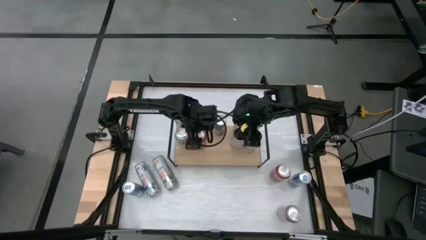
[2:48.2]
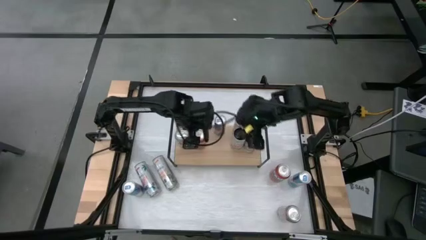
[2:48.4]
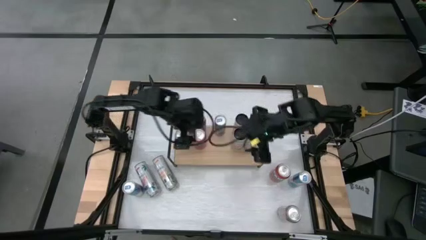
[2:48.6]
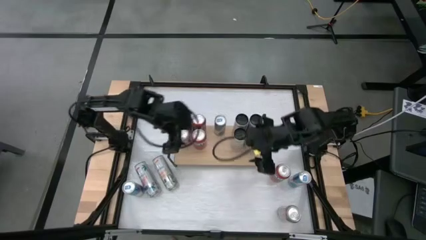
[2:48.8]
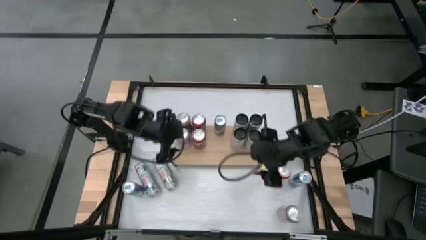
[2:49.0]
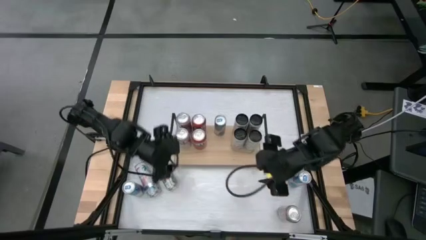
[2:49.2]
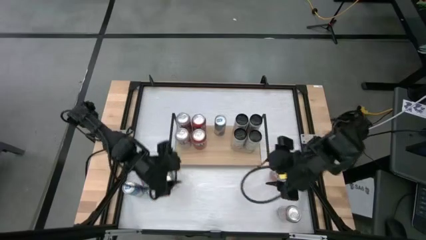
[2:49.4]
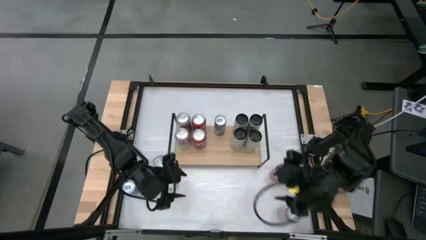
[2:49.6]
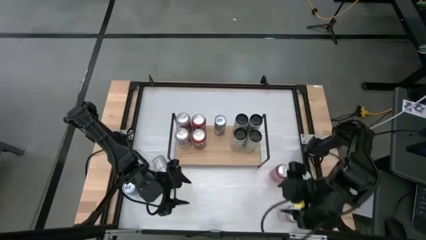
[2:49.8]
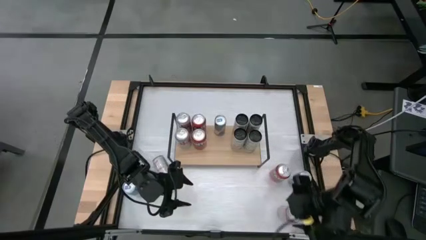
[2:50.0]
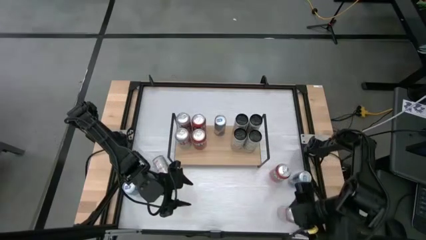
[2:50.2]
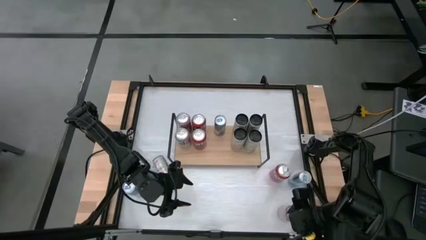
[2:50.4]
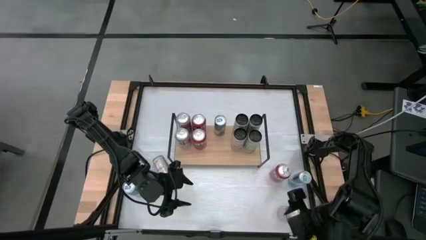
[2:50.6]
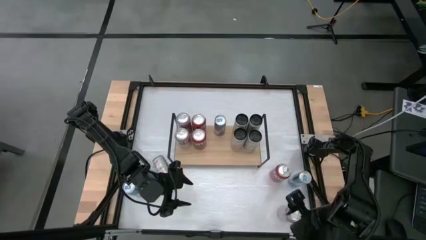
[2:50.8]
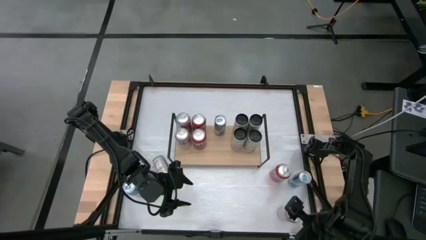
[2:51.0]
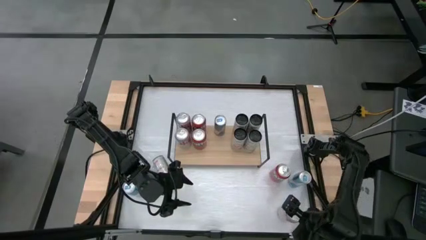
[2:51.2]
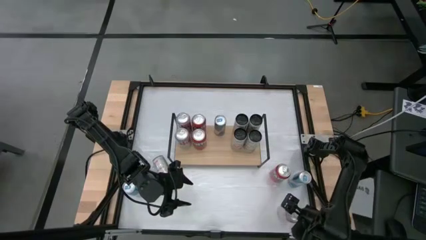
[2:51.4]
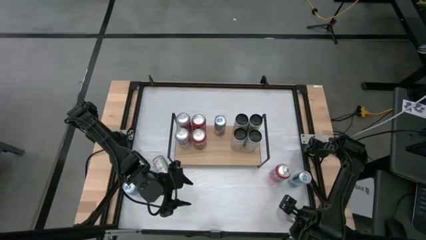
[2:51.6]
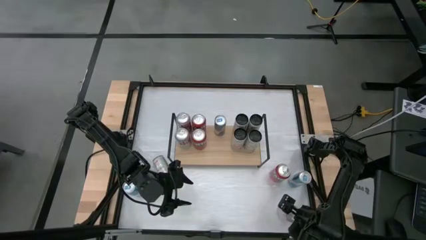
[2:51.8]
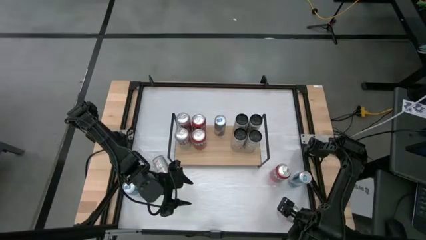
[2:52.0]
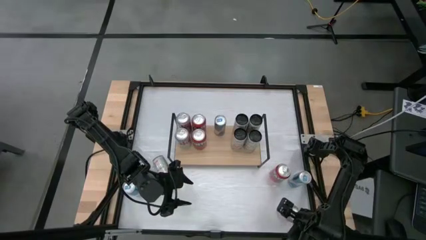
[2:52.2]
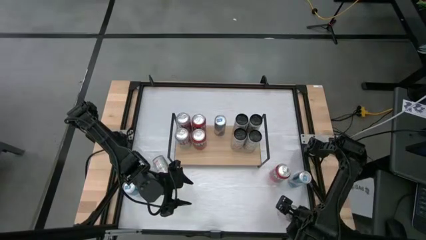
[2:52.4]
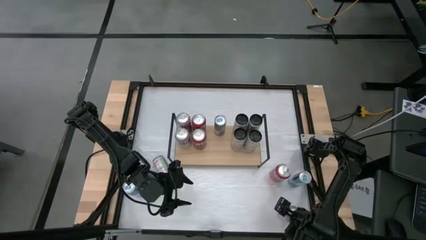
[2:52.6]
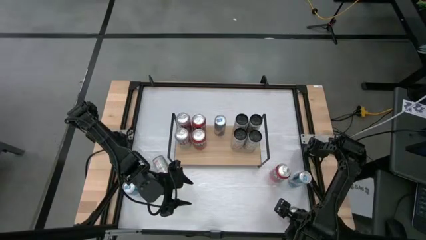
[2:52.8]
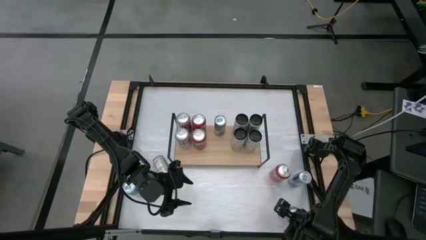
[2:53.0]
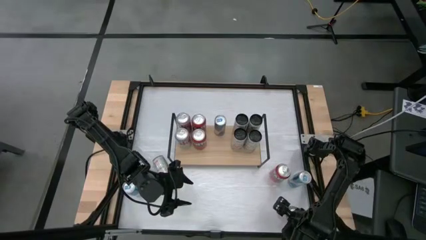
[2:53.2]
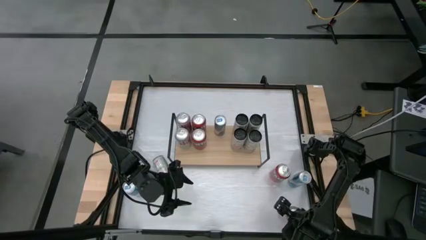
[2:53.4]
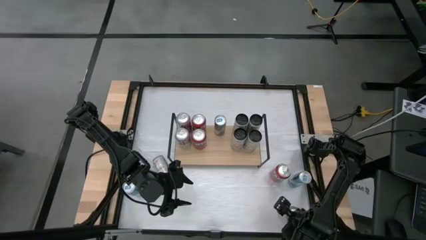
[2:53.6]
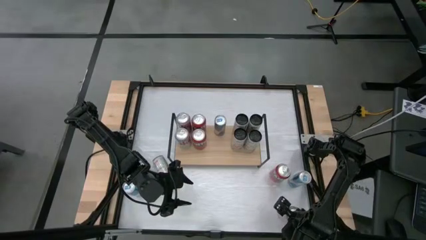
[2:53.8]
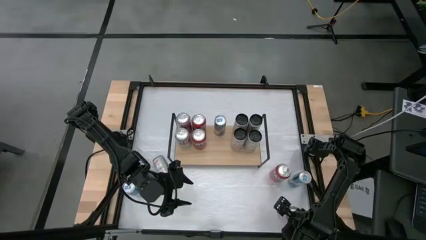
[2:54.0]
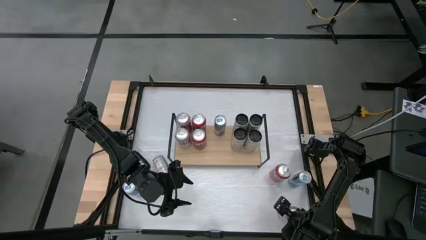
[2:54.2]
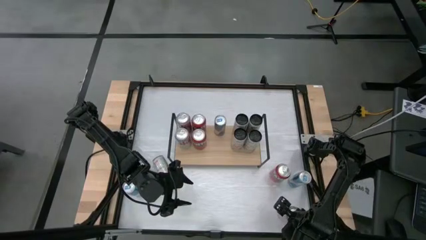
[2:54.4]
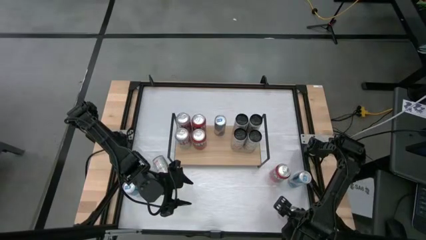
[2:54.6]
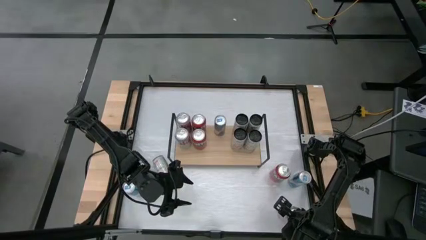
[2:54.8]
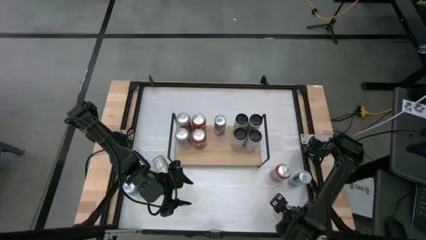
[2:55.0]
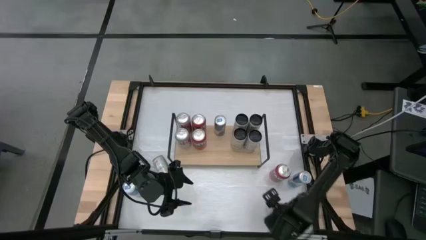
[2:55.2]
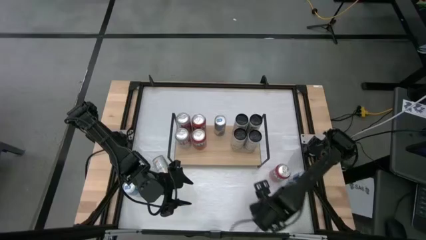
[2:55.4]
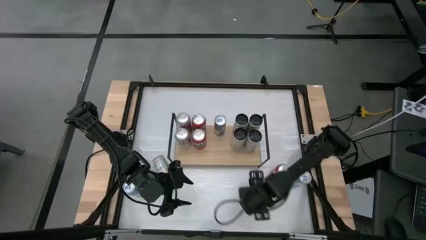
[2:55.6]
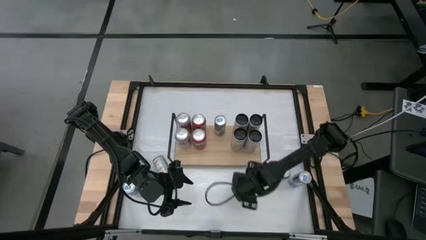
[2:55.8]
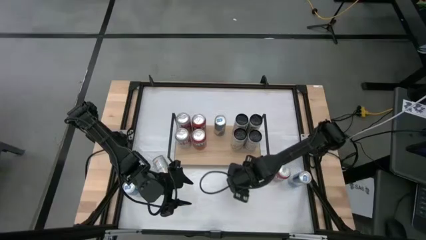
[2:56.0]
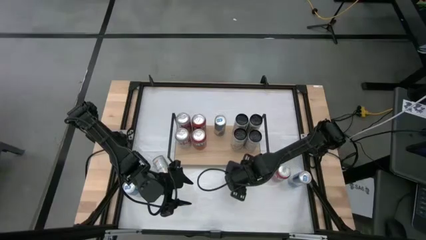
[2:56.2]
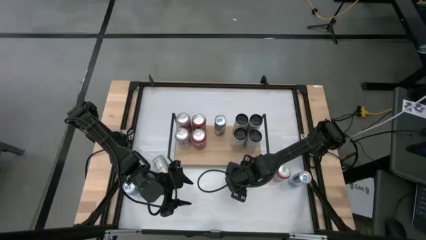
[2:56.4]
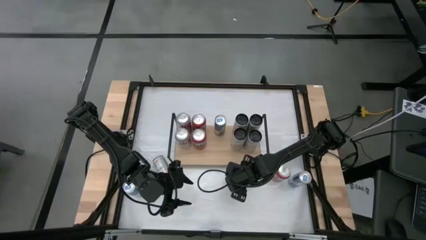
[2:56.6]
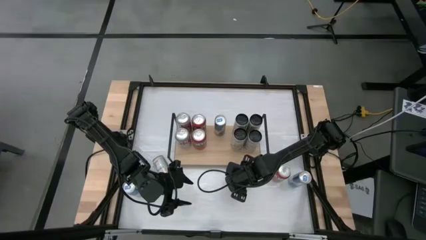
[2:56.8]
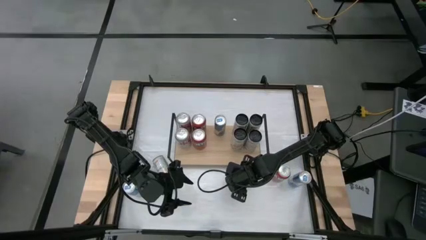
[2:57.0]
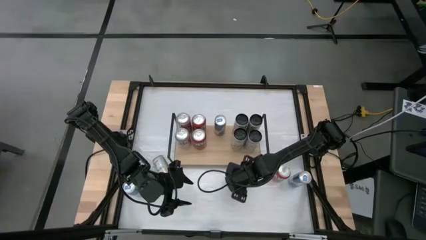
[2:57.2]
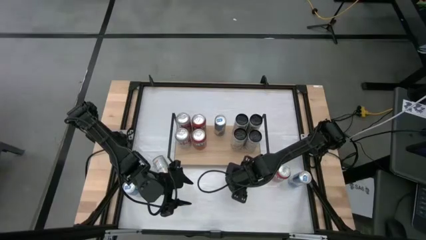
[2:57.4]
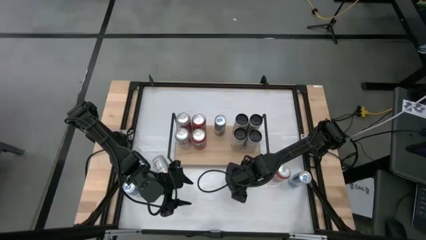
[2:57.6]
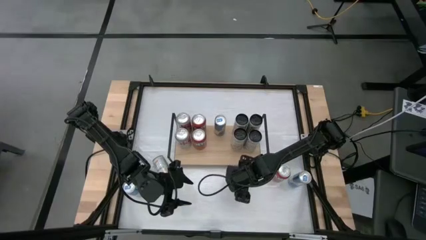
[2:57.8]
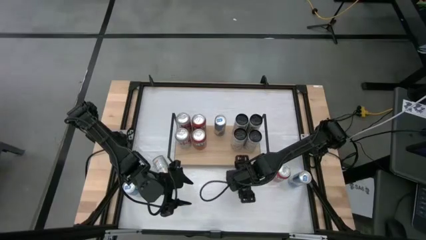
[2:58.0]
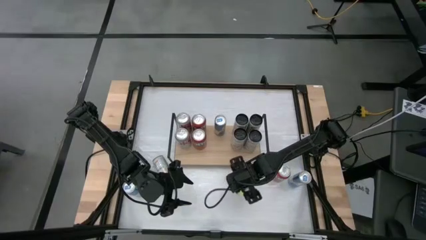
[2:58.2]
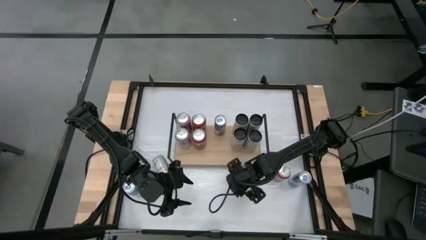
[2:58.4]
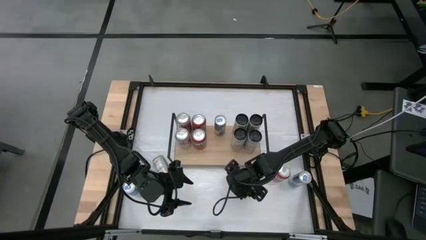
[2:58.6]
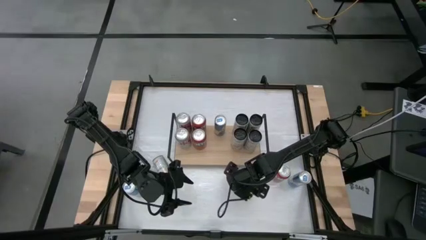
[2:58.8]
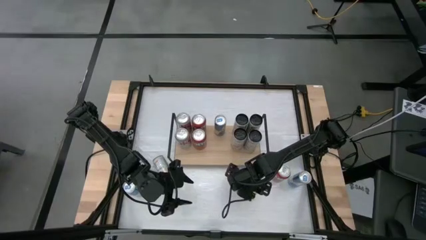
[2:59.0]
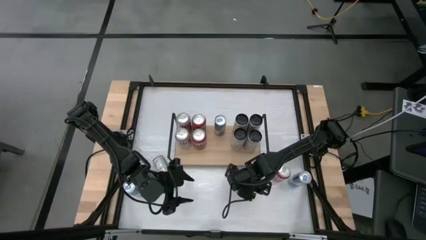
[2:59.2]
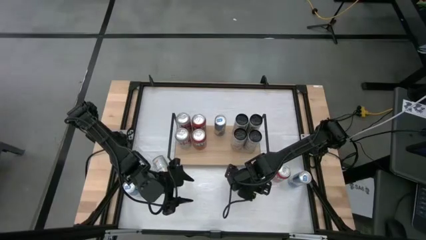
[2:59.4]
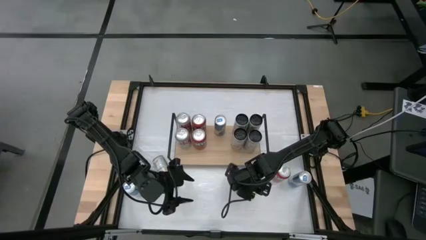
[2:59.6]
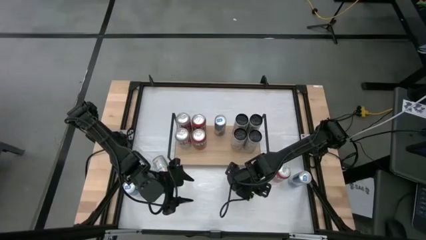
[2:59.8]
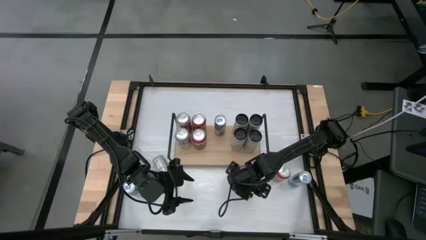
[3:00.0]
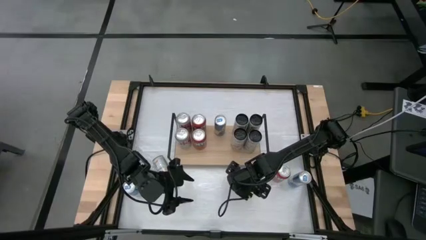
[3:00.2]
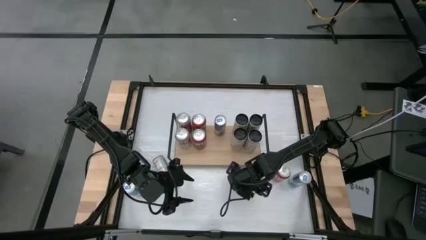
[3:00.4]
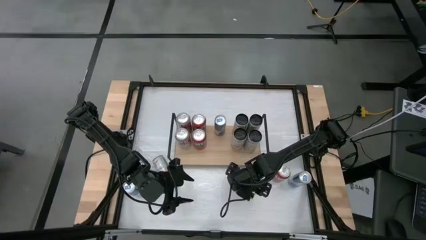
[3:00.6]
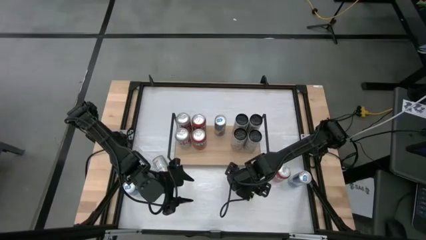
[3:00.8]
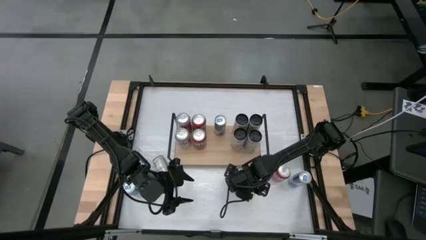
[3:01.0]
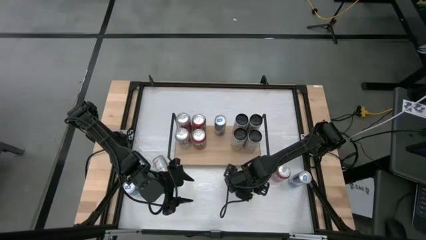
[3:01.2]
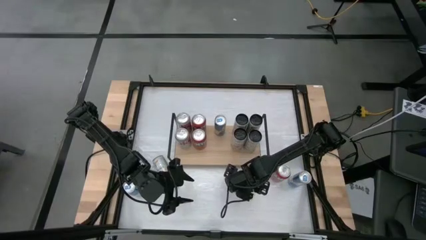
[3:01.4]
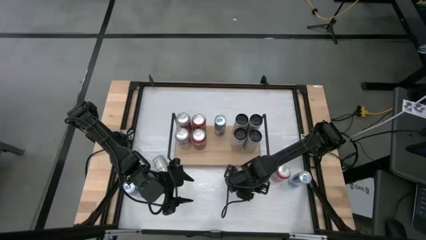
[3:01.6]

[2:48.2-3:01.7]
Task: Place canned beverage on shelf
Put the silver-red soda can on the shelf aligned with the other silver-red soda can
